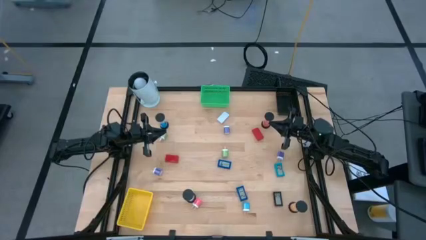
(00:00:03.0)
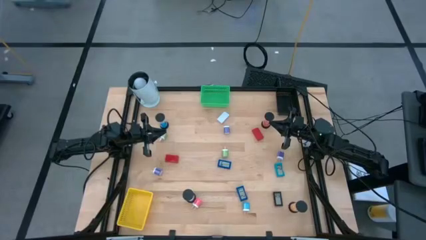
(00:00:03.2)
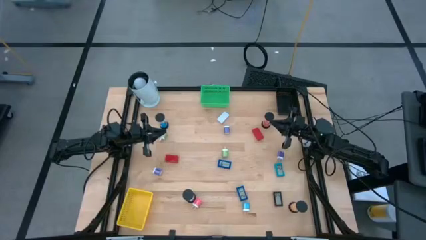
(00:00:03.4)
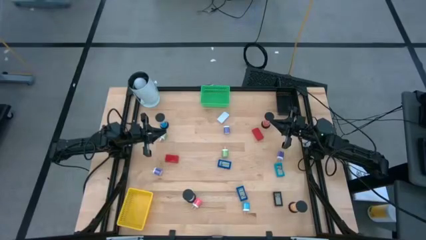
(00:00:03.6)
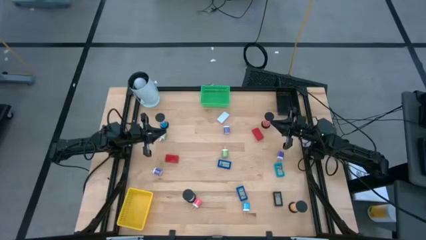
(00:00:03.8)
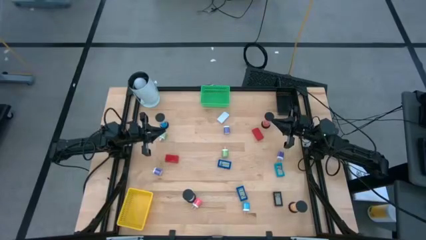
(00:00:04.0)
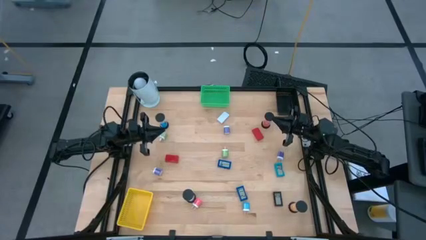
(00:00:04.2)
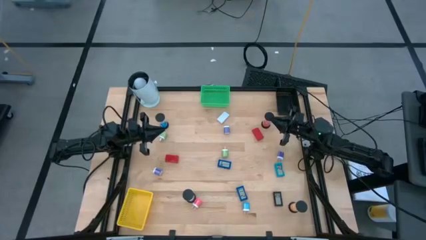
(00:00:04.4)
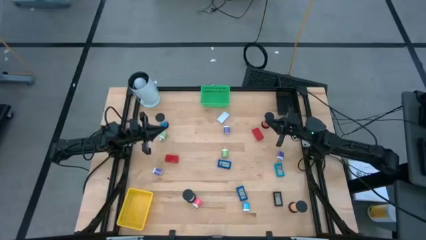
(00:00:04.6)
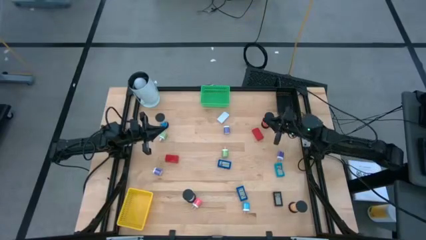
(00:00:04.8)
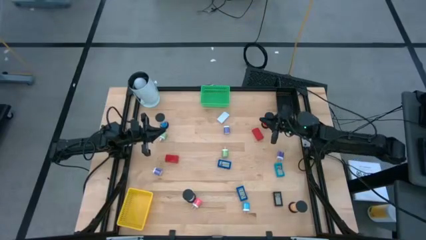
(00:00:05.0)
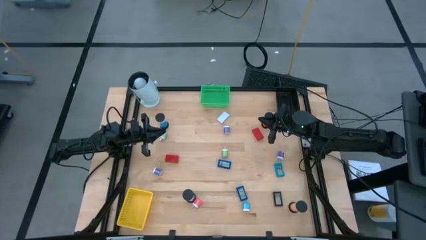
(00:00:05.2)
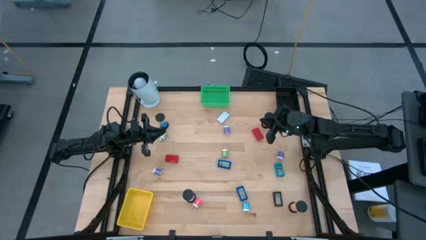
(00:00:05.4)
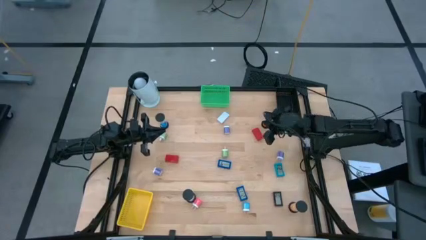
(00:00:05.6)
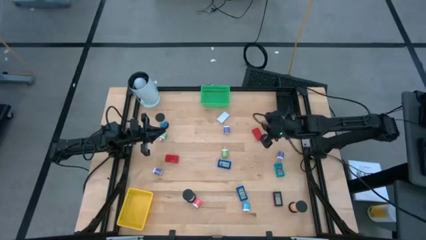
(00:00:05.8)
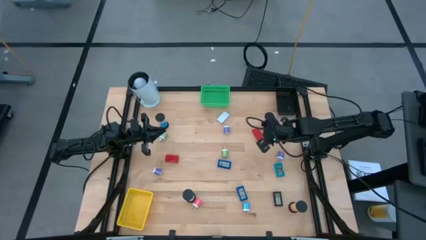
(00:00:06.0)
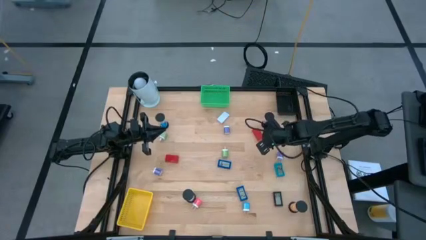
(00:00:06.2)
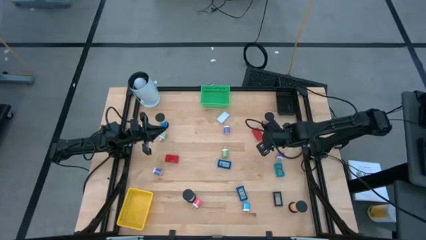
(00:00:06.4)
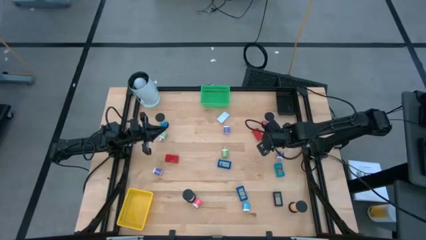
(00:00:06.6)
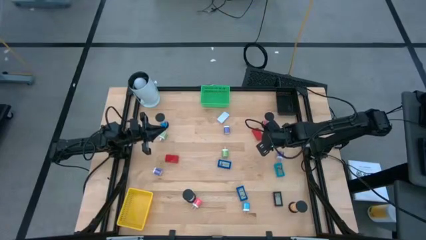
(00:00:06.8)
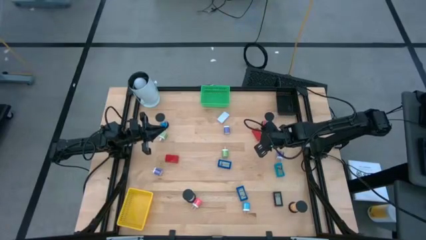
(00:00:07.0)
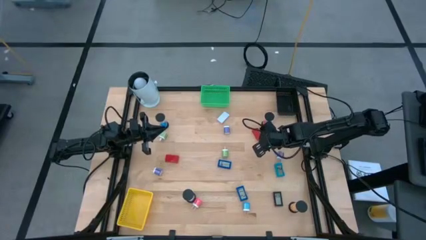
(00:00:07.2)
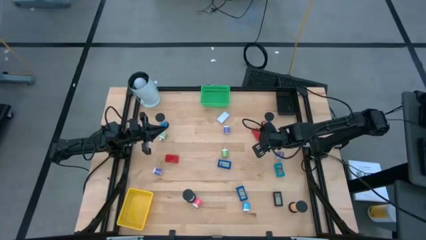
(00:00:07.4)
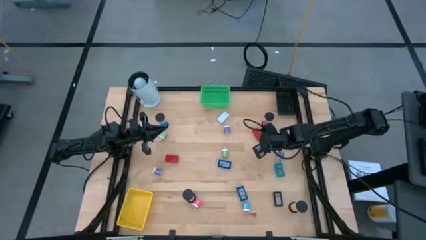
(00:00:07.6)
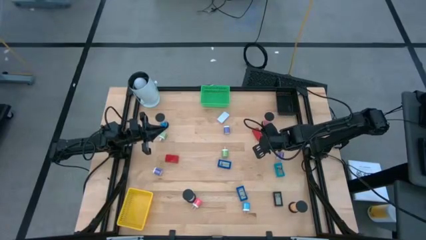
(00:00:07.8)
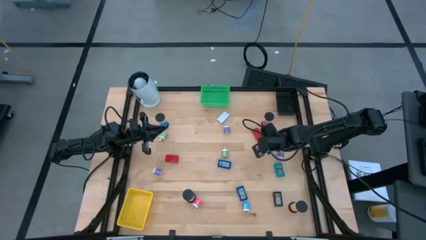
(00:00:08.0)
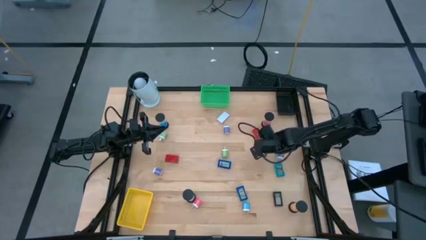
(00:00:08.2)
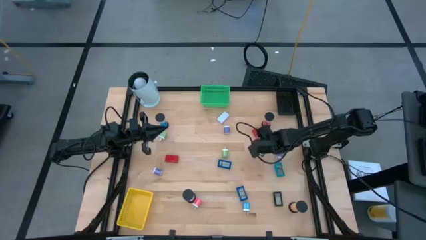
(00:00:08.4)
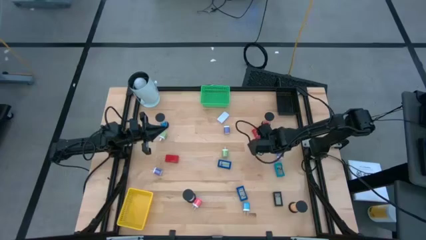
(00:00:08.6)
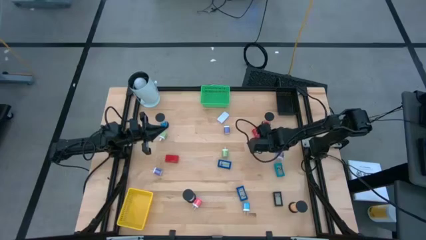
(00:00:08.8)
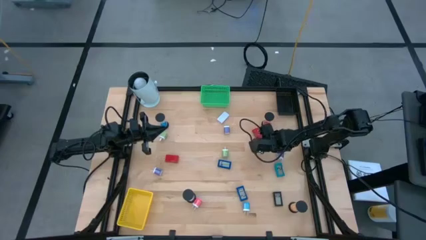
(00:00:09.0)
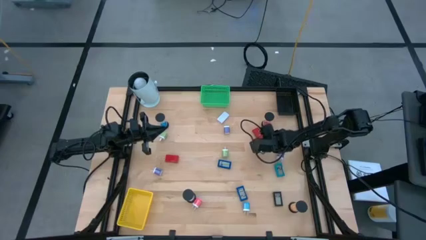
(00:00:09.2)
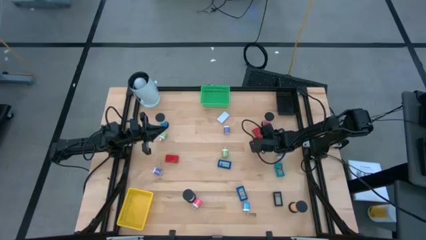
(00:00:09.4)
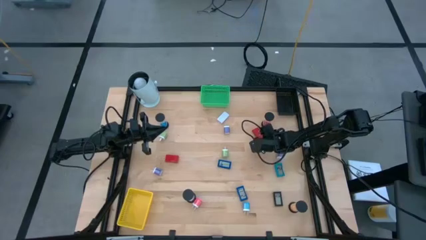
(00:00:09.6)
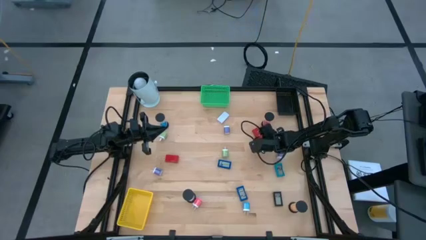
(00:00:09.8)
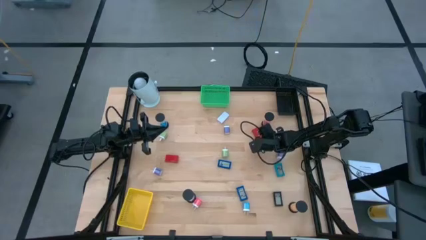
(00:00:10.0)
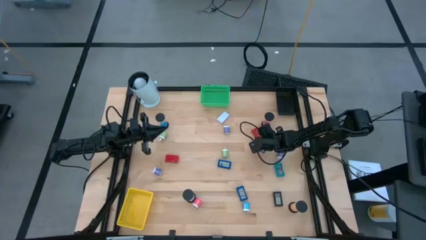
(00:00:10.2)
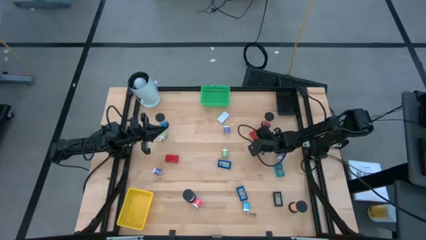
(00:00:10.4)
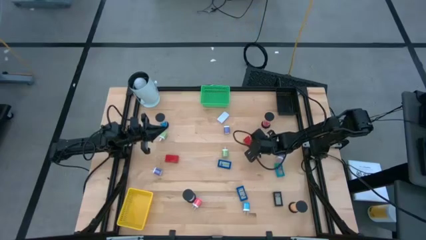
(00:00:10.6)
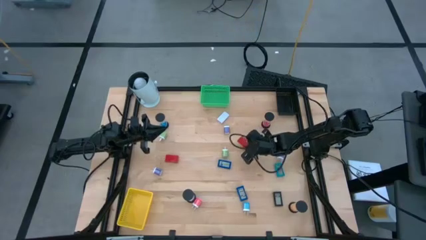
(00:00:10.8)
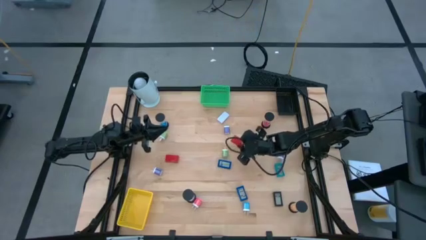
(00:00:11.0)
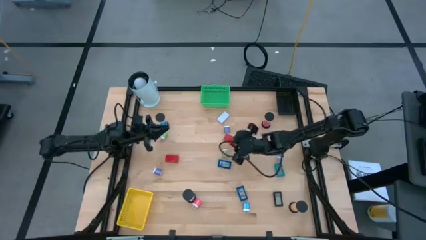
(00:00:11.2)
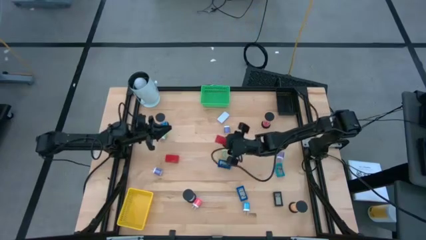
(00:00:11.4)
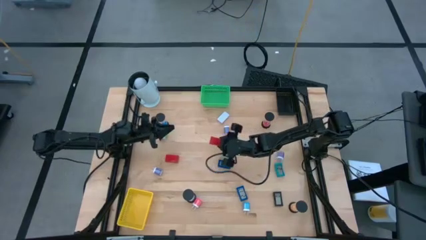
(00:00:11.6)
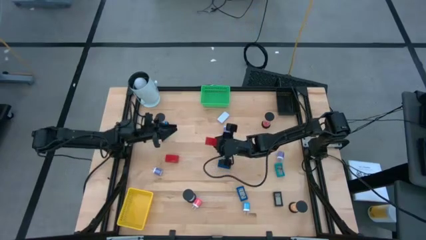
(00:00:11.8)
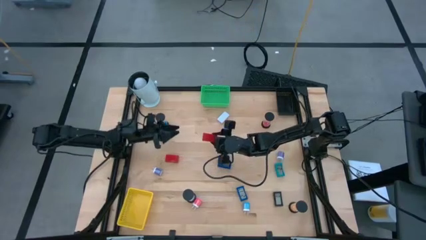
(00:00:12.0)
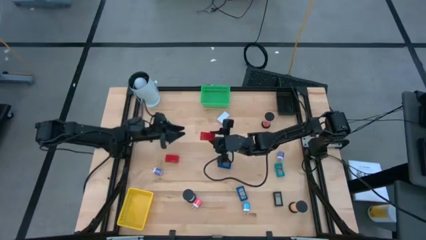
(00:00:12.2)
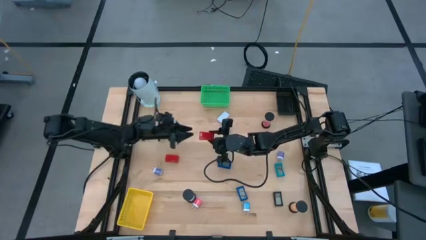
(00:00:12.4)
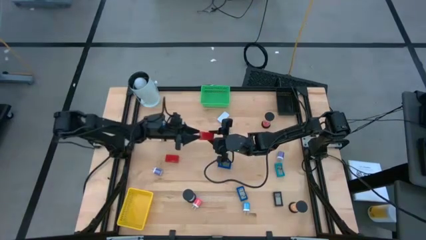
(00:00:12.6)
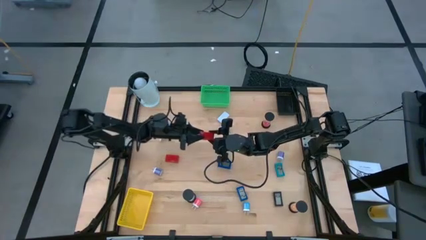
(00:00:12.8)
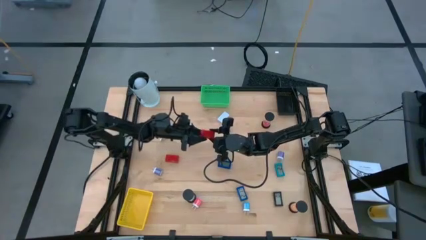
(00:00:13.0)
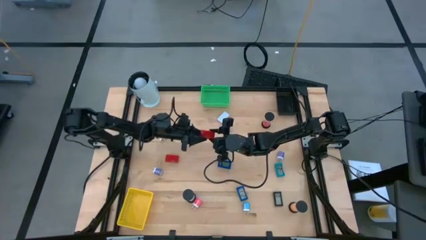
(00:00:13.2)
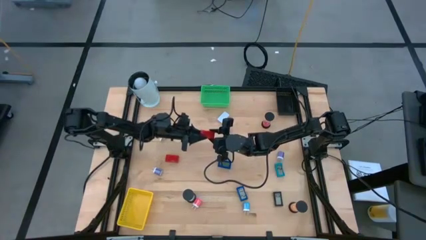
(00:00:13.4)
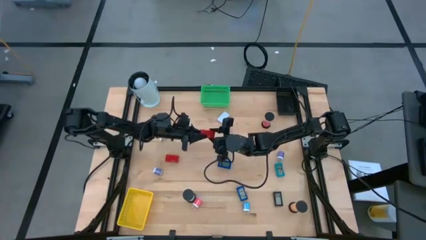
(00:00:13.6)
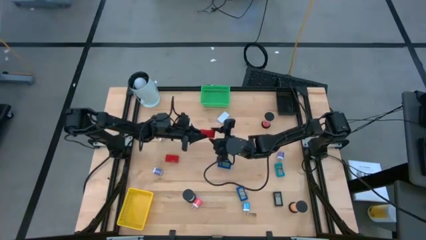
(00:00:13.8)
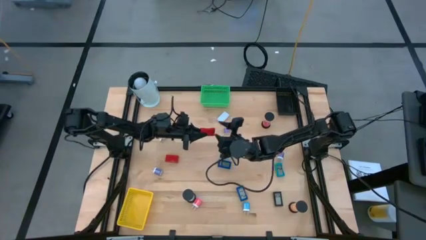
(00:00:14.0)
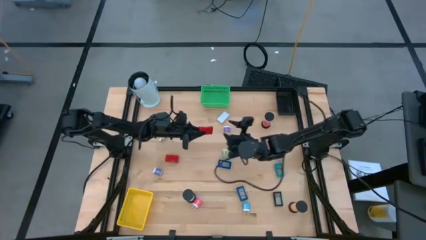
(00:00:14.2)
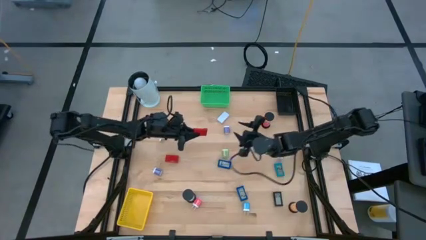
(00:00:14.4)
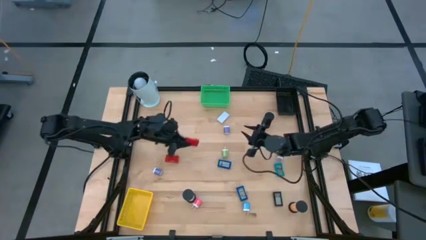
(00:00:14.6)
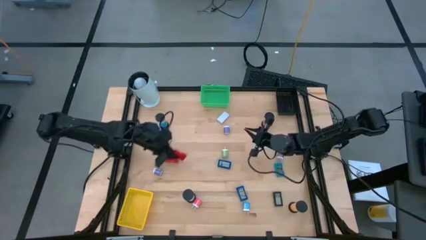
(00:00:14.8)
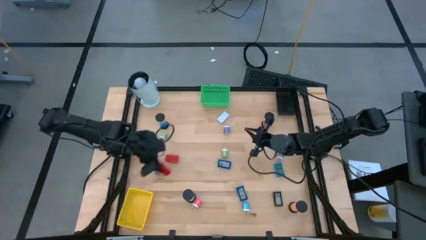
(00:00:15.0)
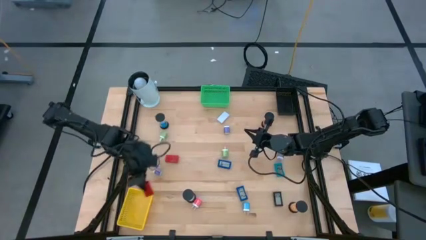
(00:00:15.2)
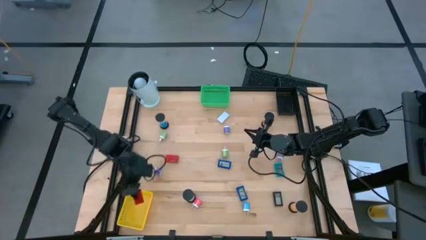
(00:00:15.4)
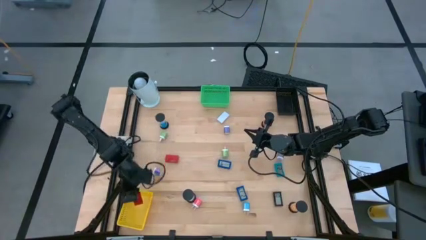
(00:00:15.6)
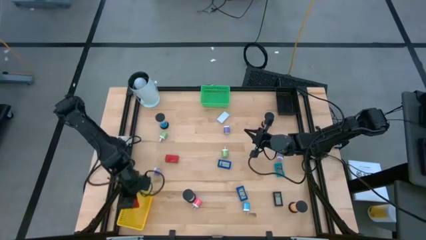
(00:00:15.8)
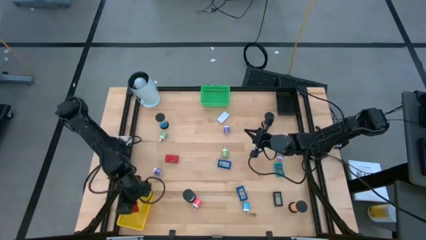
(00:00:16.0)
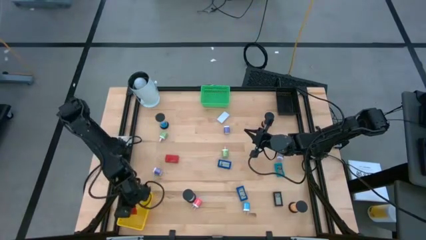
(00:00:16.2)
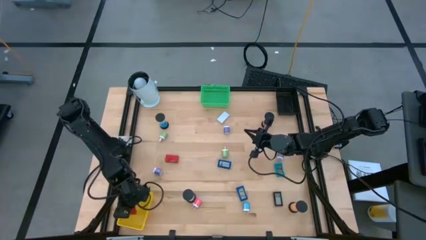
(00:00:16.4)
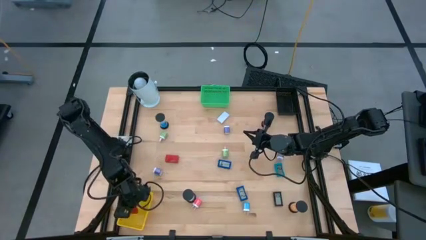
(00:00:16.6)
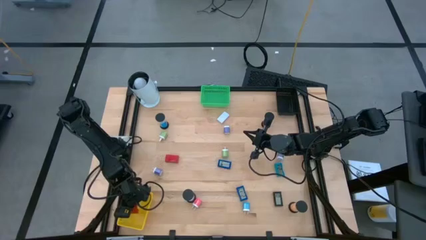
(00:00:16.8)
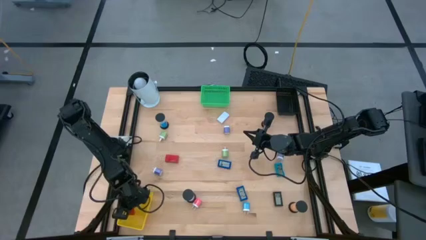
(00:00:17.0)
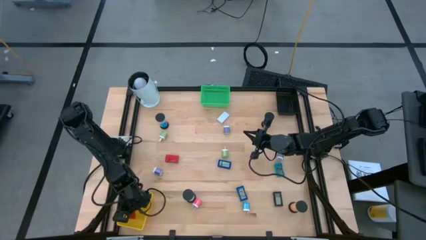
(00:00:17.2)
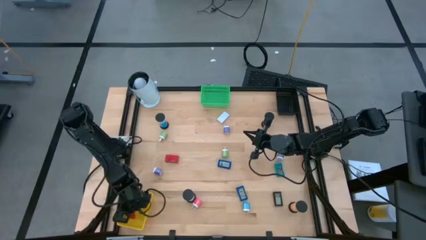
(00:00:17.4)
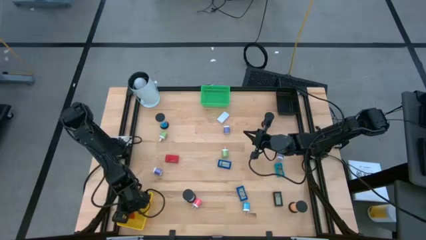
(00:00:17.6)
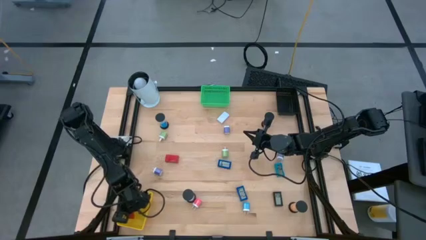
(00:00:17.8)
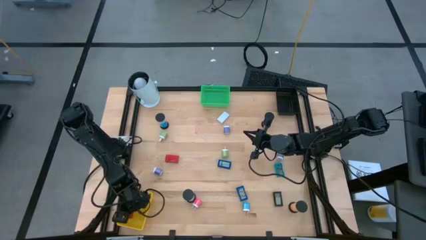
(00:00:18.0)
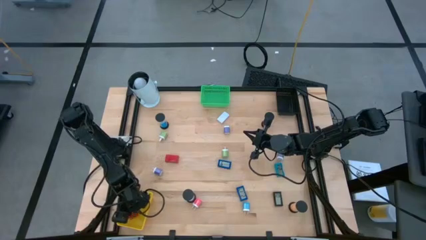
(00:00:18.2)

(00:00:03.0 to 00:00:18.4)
Task: Pick & Place Office items
Put the right red timer into the yellow basket
